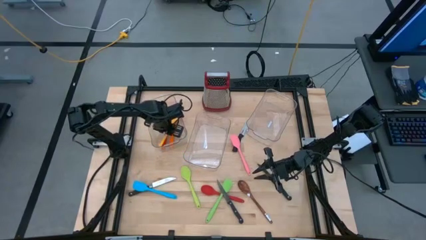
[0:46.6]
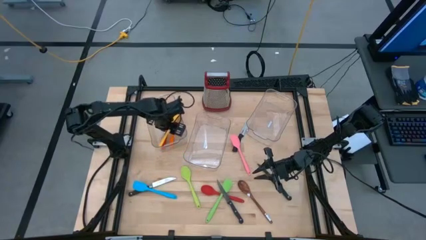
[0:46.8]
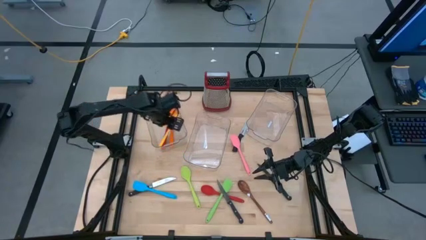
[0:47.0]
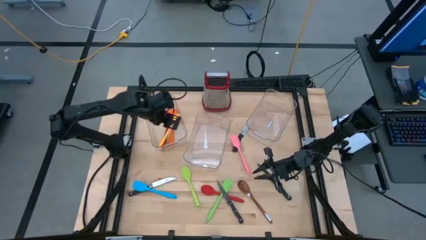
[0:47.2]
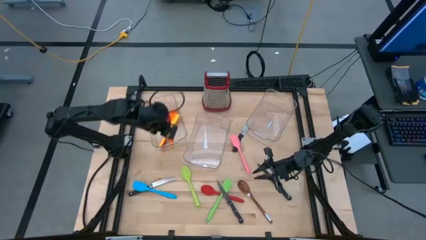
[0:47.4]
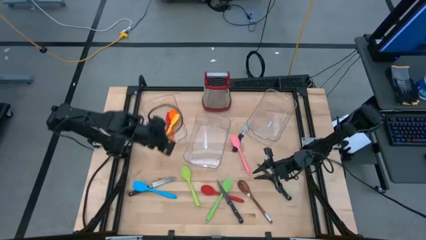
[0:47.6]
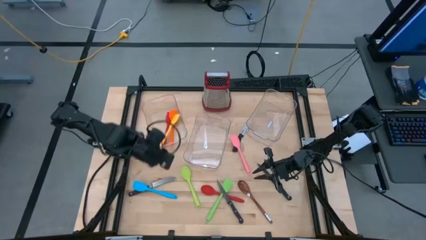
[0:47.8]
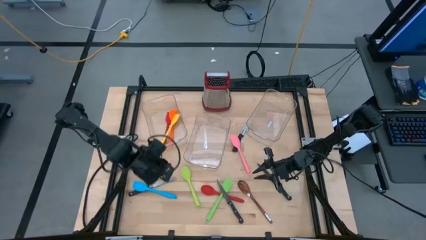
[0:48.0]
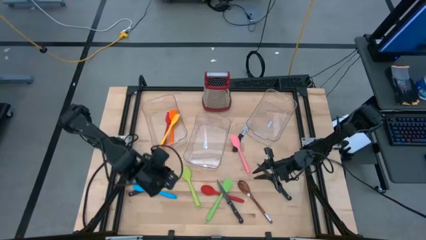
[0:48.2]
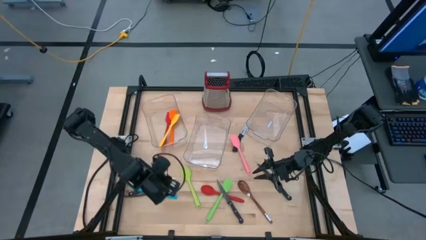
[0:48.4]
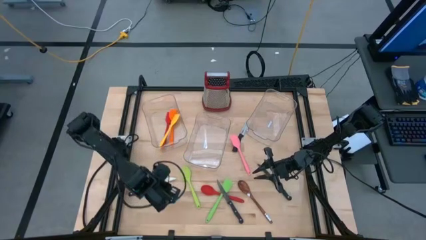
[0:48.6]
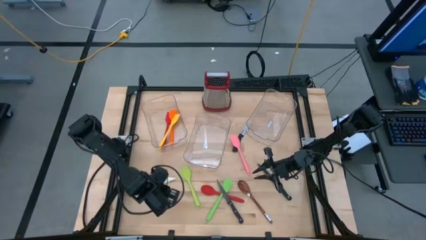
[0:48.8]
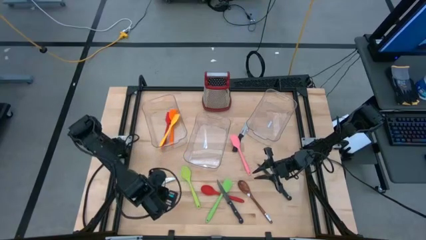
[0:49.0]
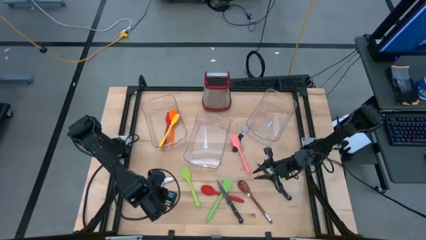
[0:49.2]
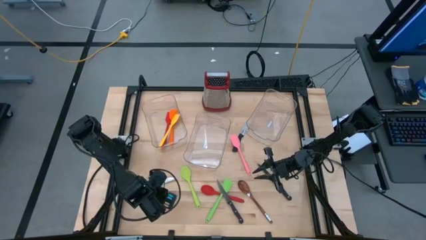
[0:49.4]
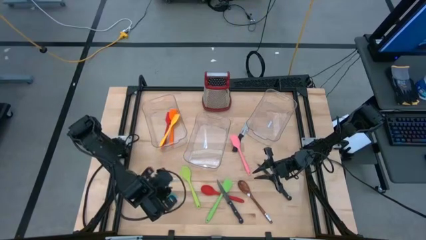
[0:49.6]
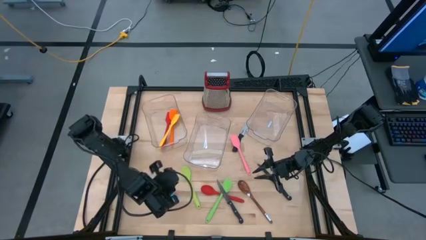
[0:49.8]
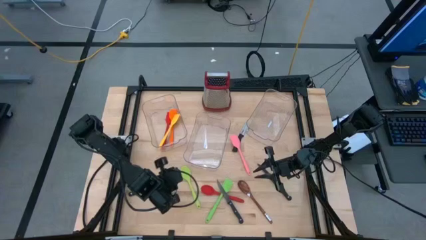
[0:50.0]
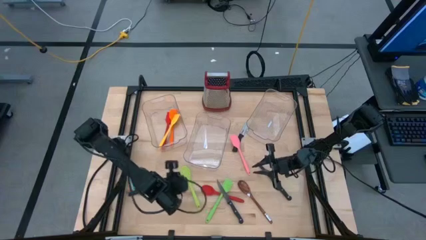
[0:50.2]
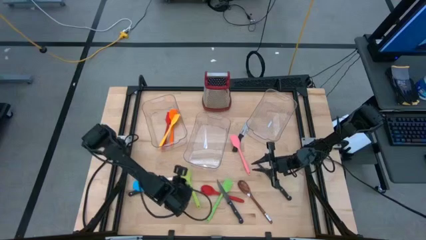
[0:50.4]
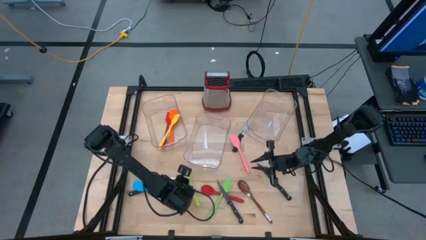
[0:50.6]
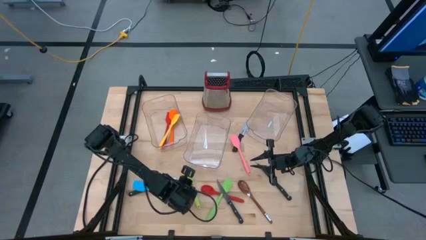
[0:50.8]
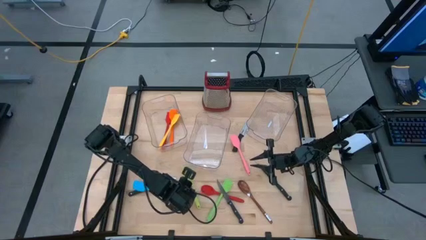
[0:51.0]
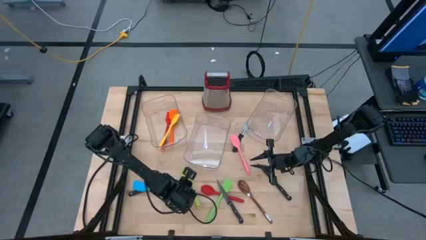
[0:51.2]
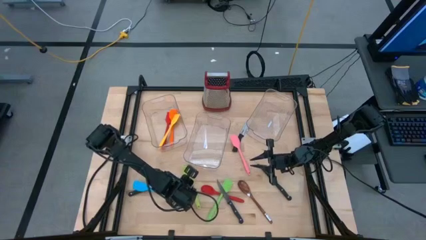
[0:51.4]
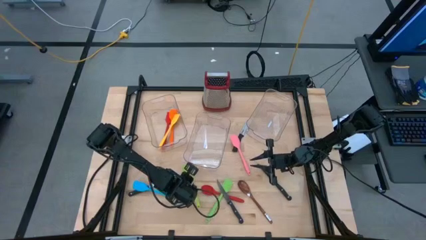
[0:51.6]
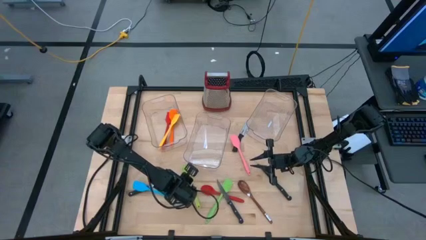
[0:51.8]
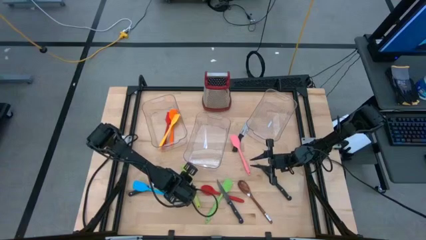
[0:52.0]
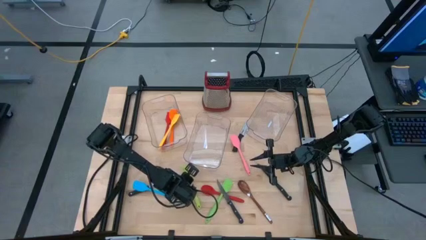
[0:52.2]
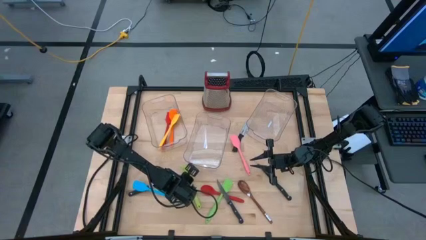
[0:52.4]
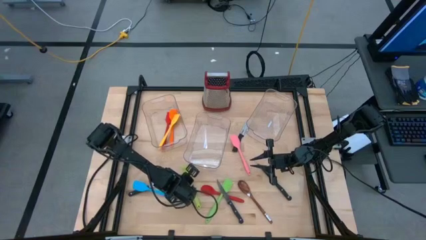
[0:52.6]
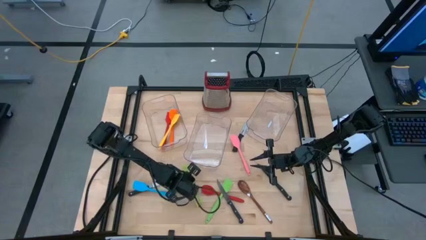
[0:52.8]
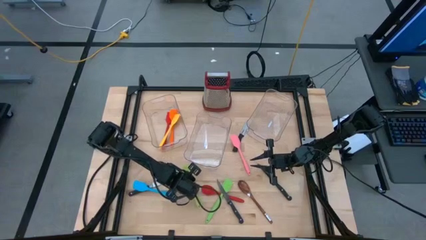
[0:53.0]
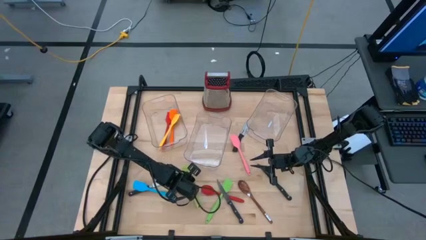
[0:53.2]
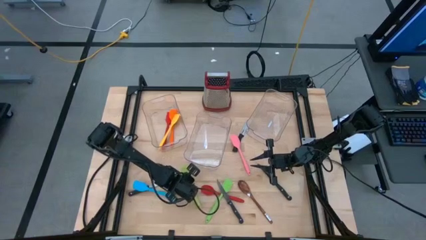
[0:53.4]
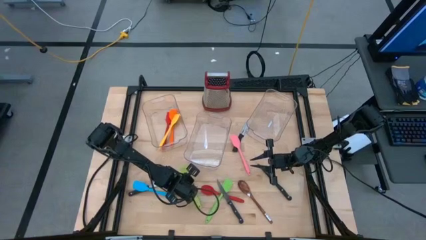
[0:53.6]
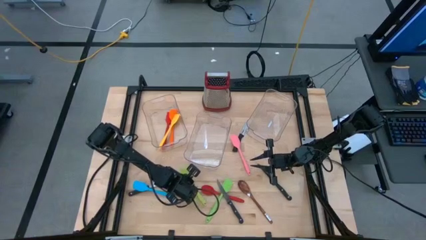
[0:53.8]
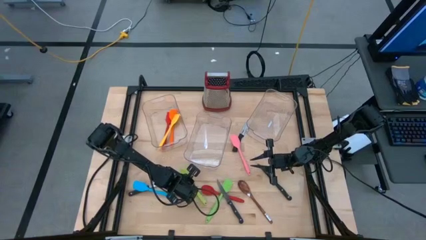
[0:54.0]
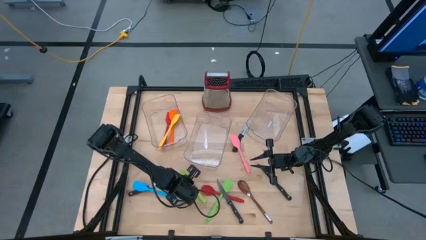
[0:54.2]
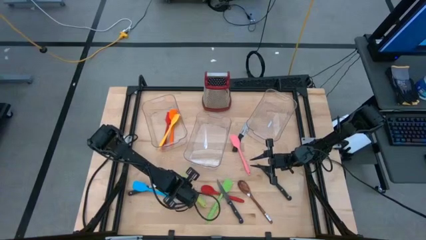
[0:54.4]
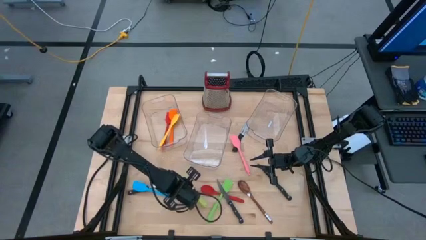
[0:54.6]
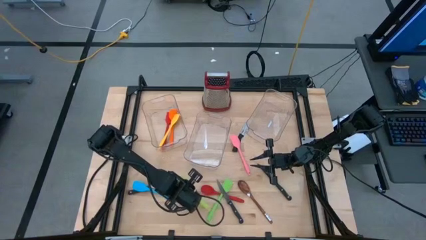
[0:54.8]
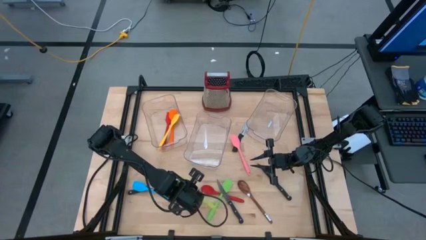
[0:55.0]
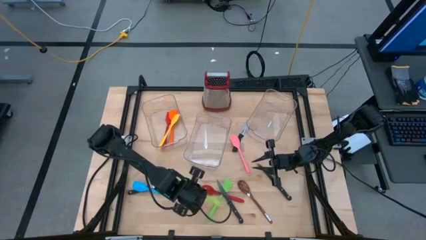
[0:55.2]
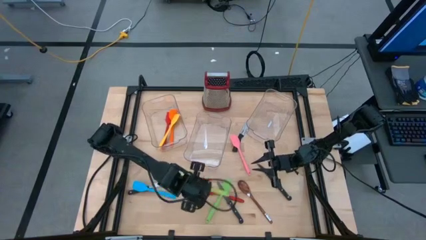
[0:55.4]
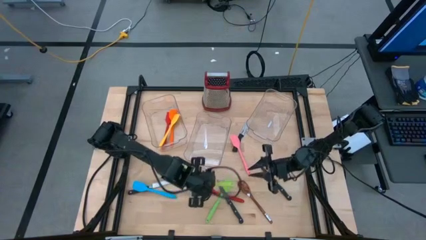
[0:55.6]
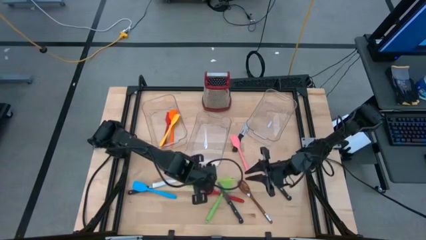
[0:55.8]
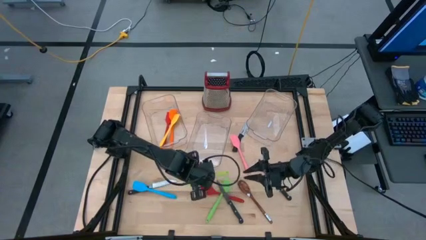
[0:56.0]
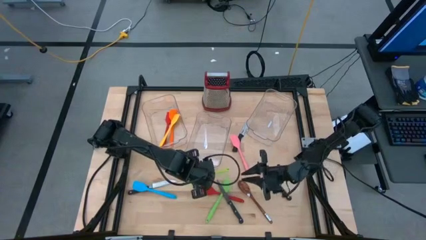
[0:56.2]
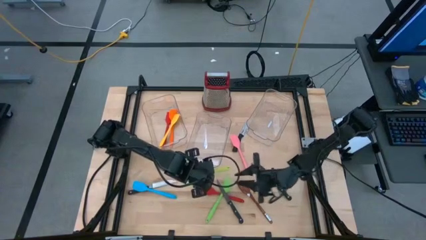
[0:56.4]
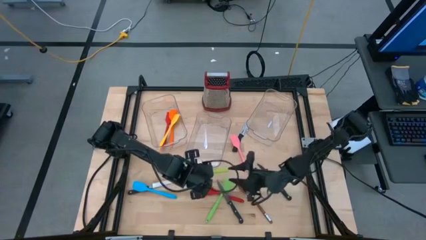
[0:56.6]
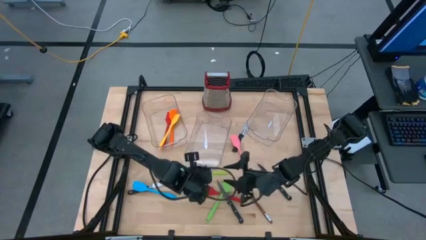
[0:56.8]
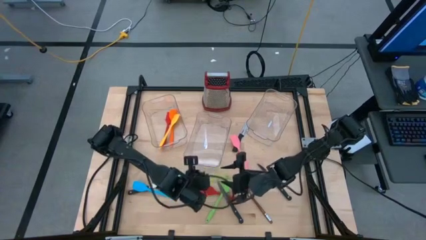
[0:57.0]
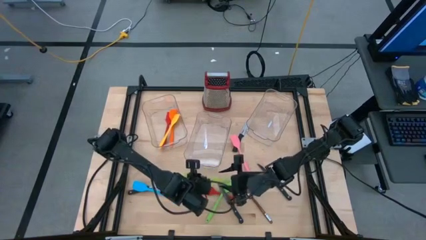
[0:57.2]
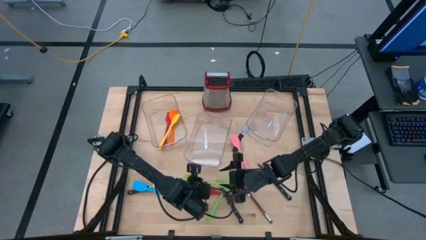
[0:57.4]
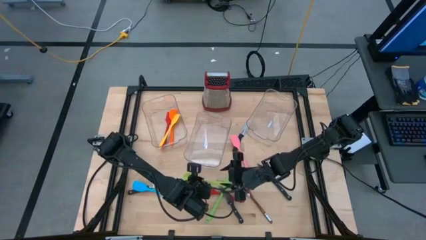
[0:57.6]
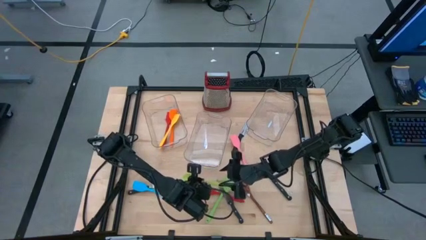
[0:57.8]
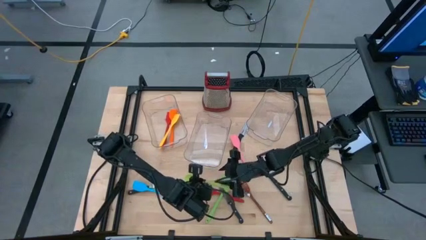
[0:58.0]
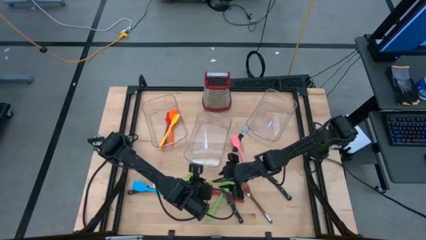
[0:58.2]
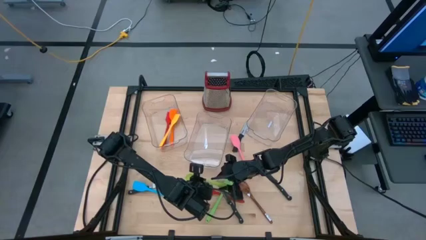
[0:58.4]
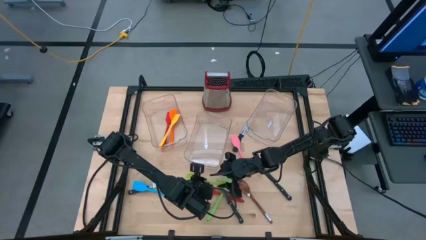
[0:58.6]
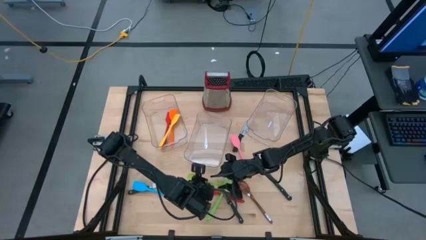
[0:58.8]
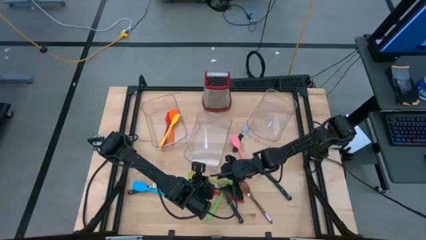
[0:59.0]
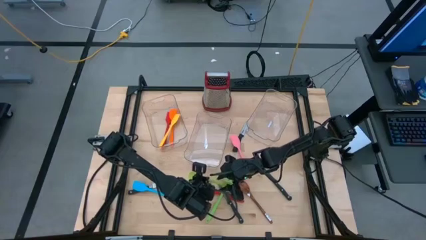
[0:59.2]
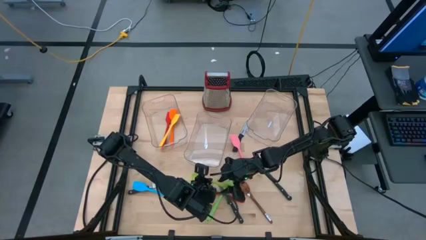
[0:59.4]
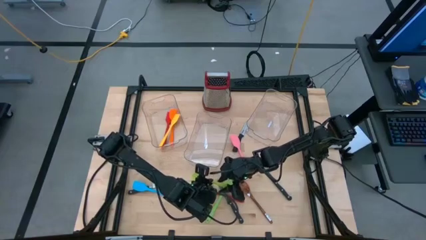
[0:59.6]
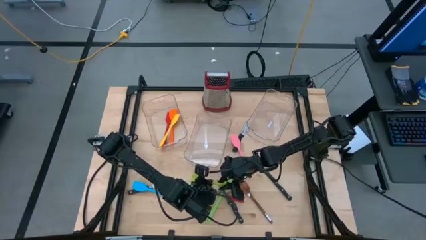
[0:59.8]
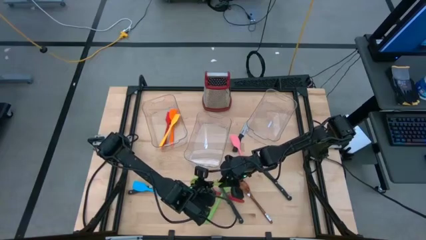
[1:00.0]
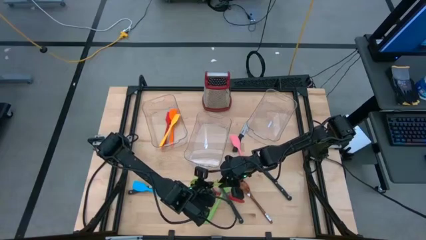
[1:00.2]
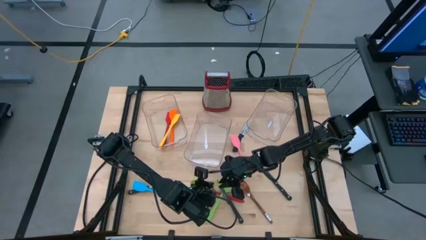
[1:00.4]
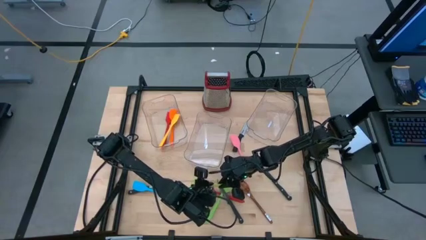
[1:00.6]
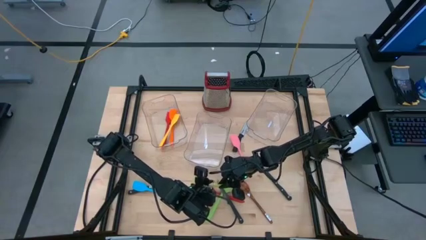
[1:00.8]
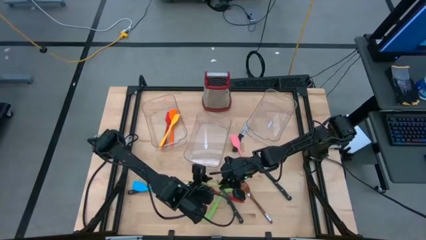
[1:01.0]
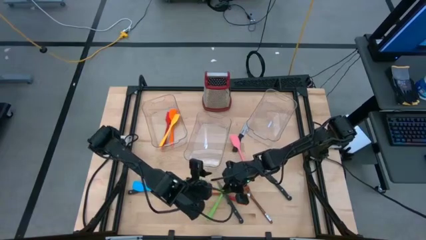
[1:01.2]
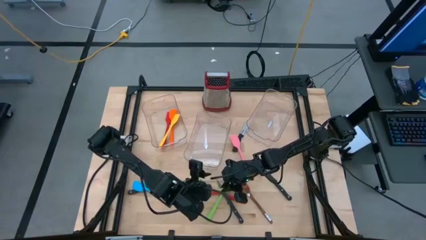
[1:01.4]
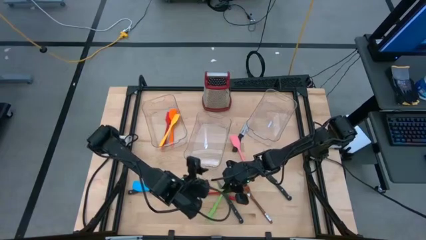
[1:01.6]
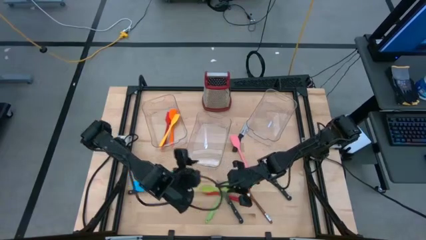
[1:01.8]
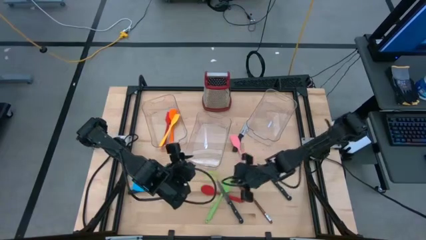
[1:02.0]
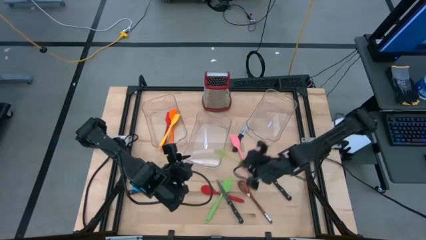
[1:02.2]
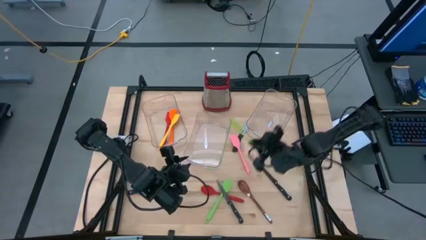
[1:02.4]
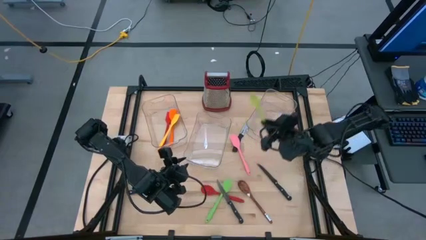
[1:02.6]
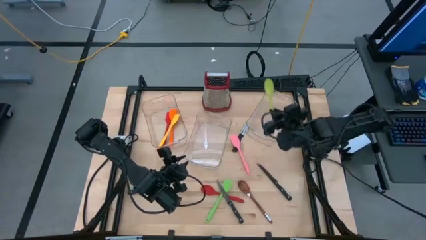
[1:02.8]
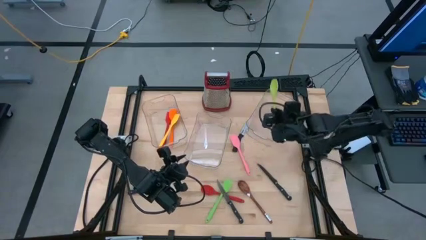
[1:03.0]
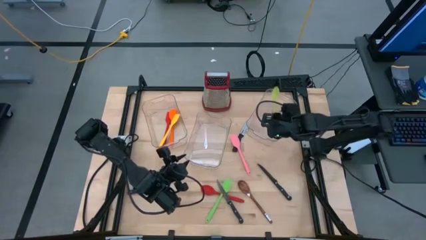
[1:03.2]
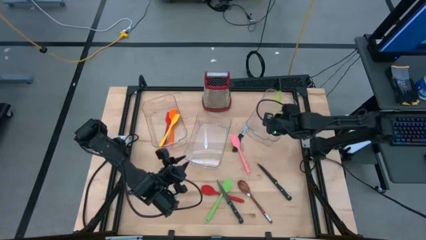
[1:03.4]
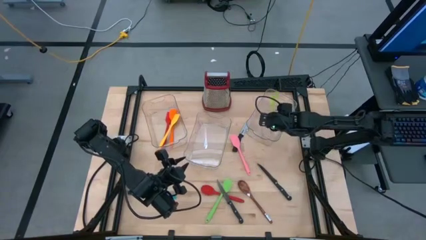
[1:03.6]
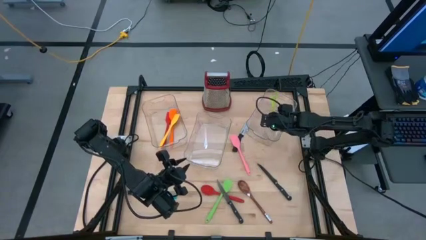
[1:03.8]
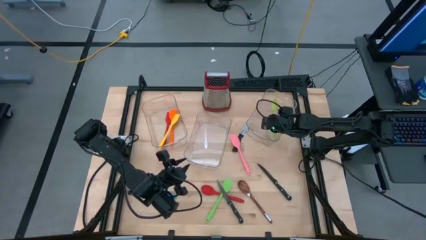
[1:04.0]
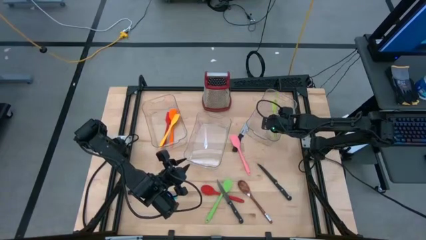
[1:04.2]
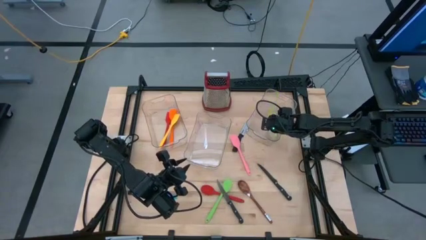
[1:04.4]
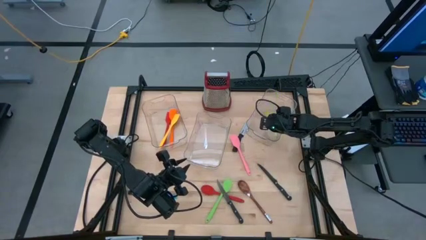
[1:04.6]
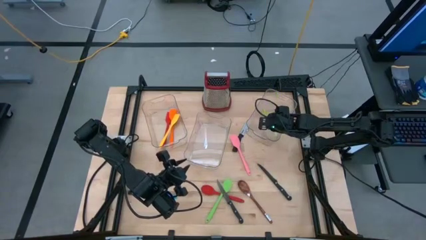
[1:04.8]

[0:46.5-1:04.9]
Task: Pick & Place Kitchen Items
Put the green serving spoon into the right transparent bin
